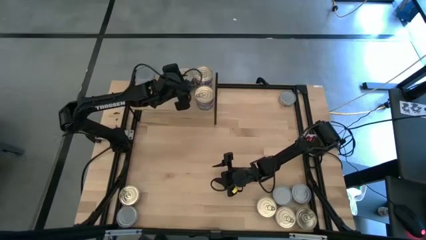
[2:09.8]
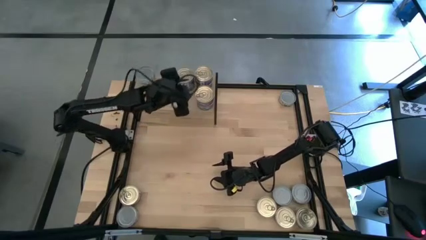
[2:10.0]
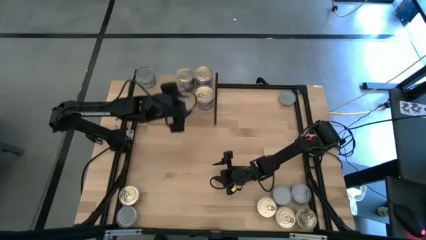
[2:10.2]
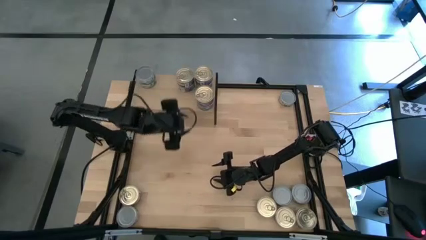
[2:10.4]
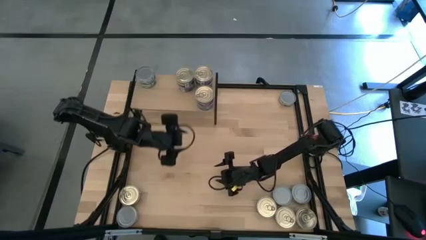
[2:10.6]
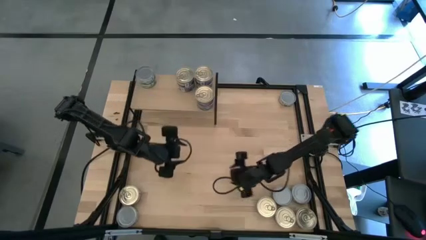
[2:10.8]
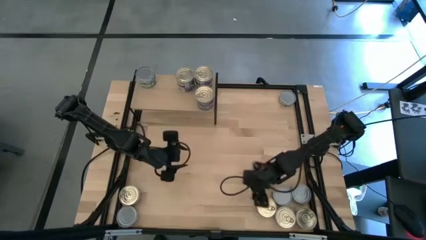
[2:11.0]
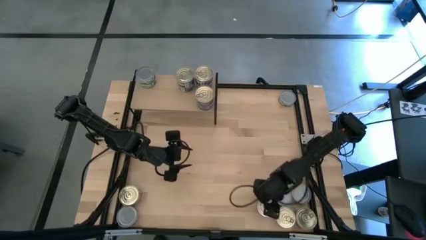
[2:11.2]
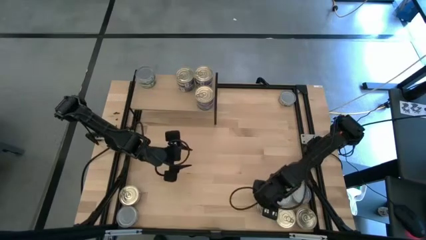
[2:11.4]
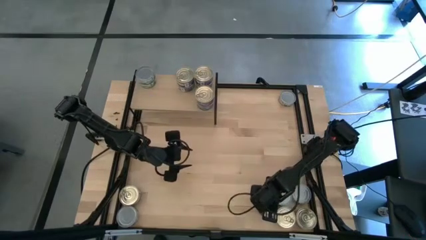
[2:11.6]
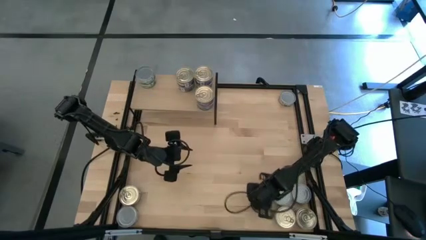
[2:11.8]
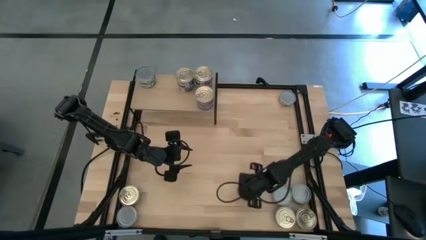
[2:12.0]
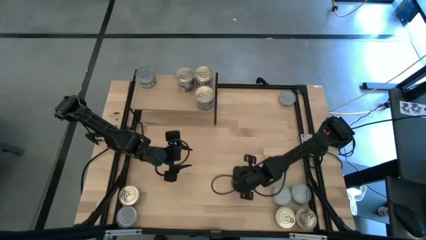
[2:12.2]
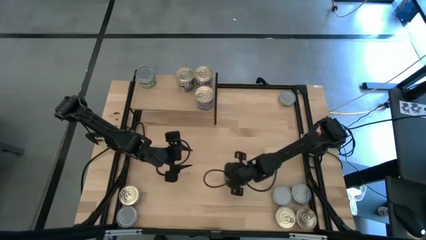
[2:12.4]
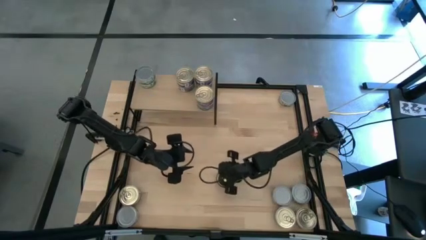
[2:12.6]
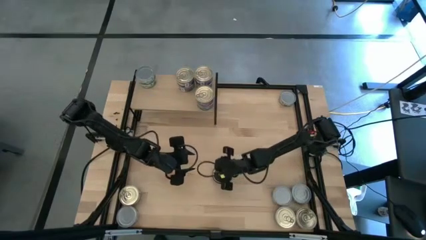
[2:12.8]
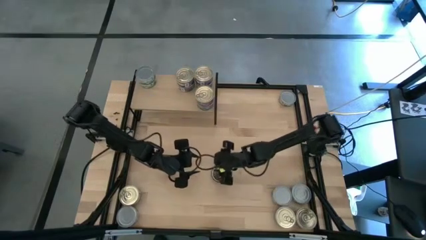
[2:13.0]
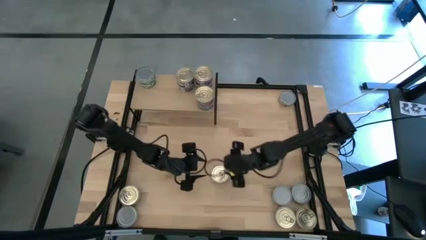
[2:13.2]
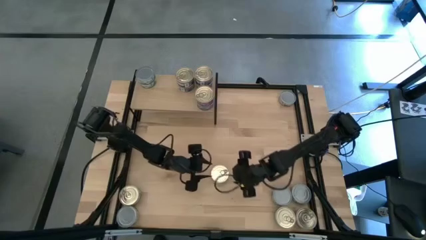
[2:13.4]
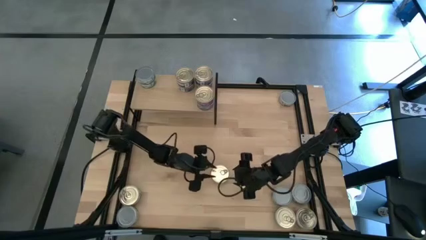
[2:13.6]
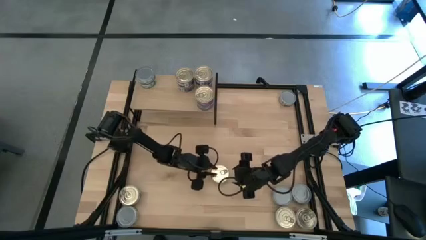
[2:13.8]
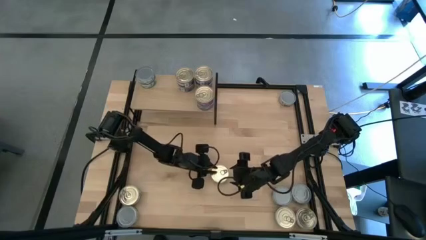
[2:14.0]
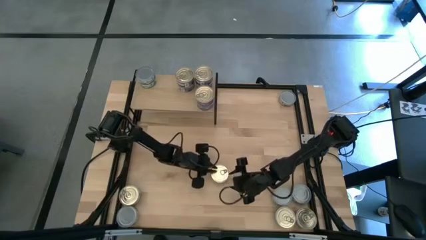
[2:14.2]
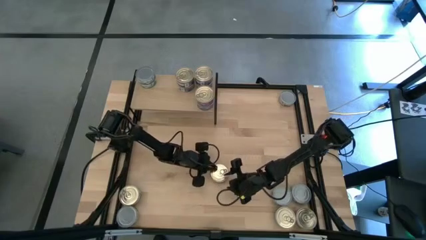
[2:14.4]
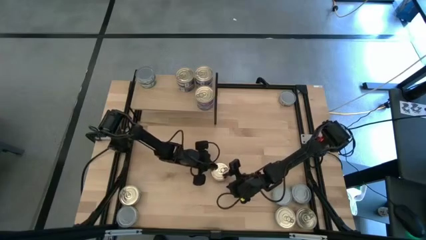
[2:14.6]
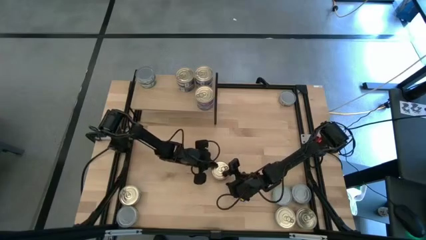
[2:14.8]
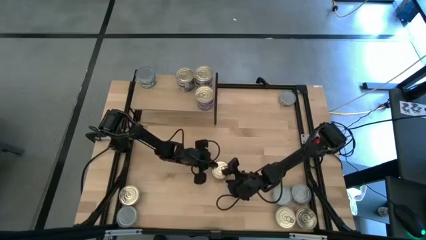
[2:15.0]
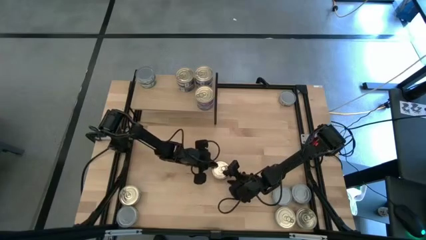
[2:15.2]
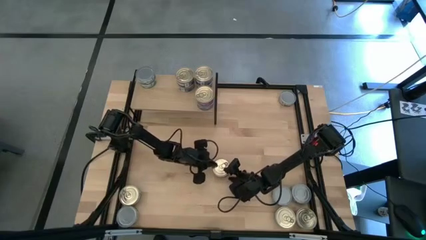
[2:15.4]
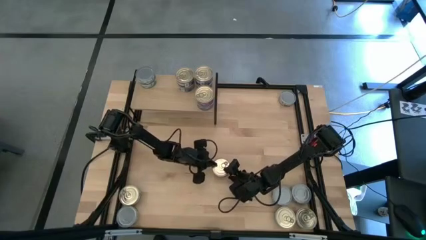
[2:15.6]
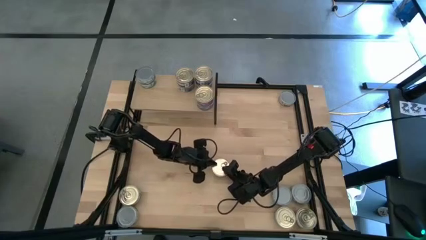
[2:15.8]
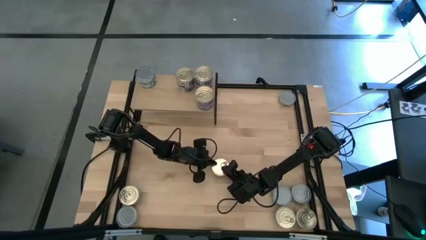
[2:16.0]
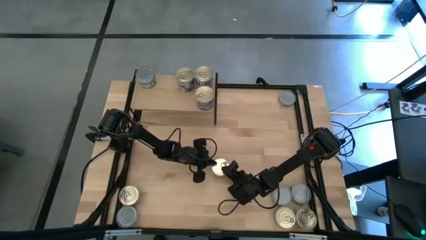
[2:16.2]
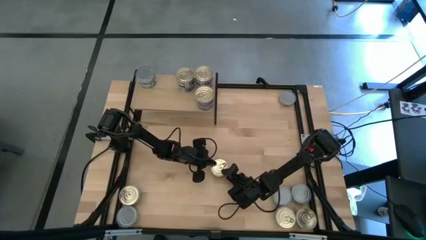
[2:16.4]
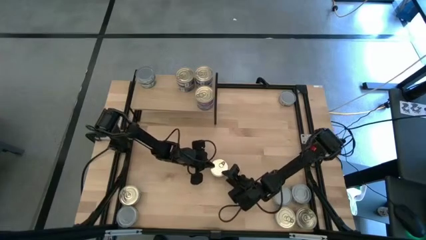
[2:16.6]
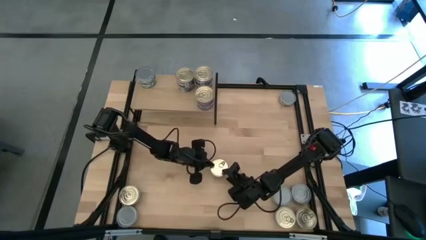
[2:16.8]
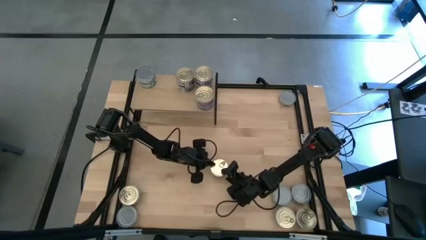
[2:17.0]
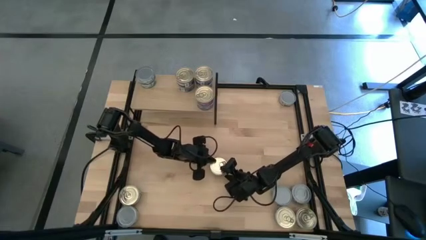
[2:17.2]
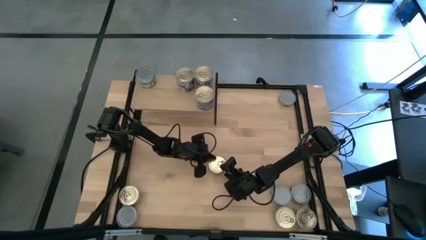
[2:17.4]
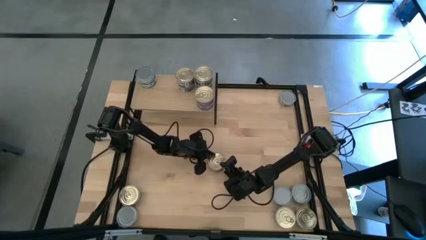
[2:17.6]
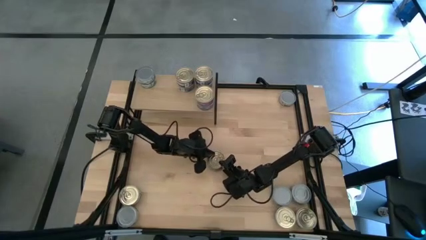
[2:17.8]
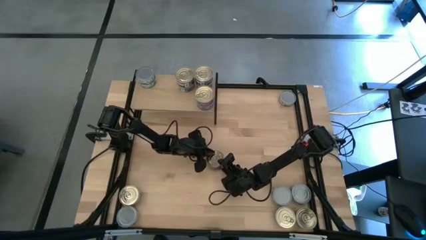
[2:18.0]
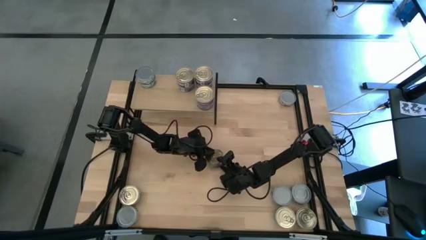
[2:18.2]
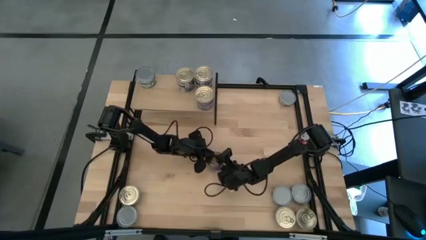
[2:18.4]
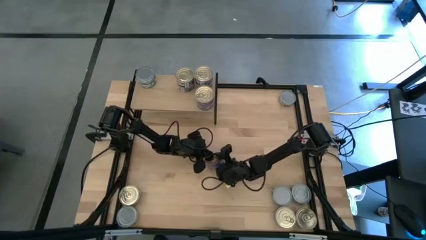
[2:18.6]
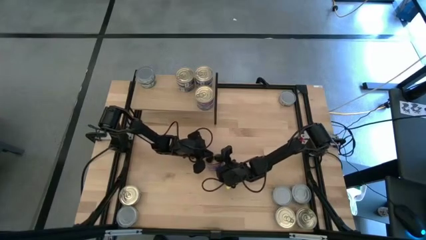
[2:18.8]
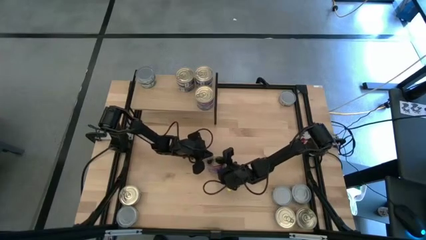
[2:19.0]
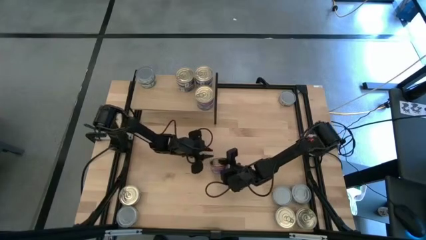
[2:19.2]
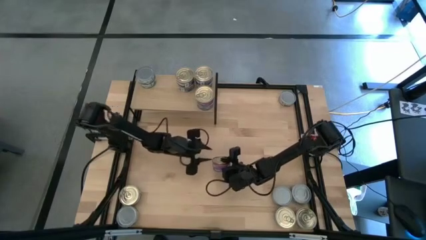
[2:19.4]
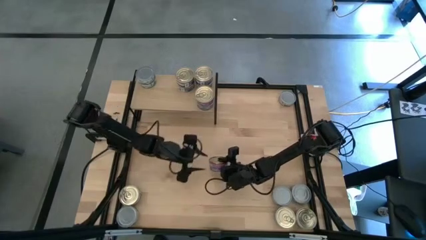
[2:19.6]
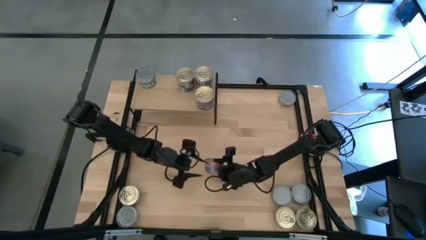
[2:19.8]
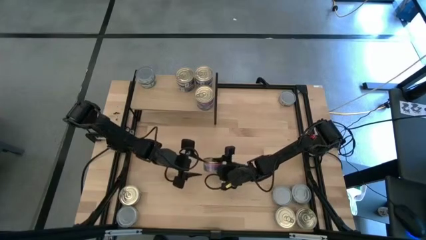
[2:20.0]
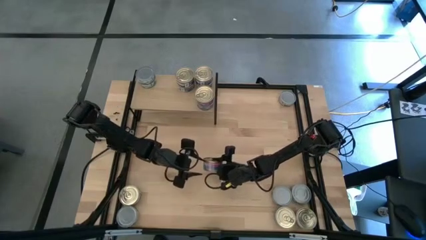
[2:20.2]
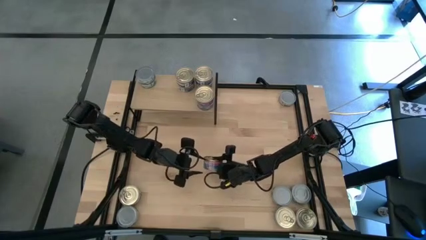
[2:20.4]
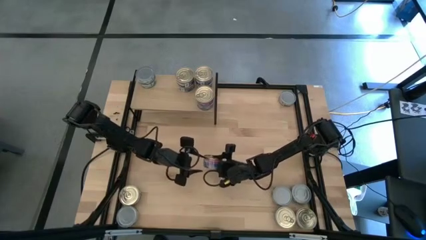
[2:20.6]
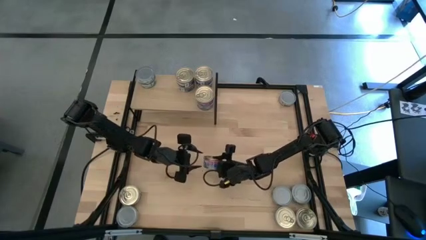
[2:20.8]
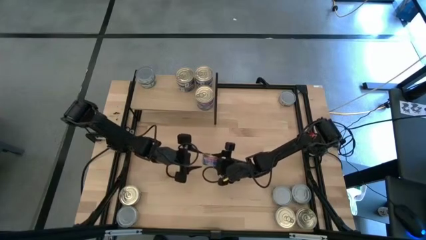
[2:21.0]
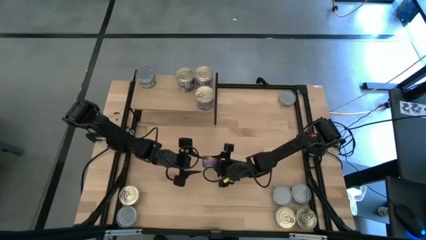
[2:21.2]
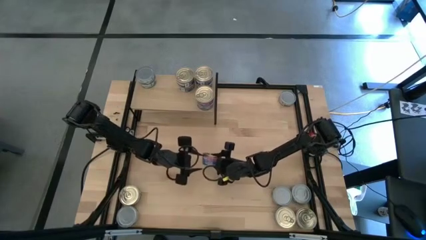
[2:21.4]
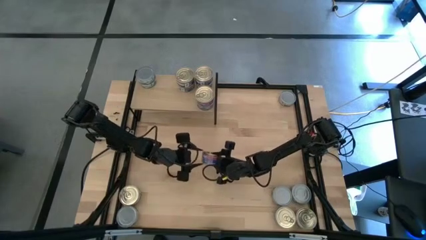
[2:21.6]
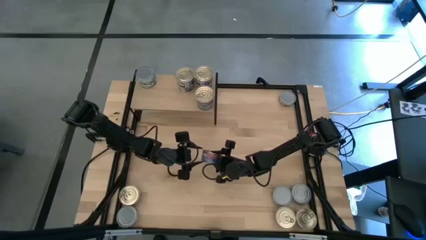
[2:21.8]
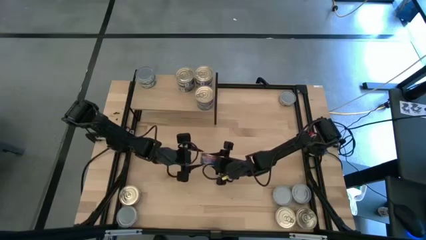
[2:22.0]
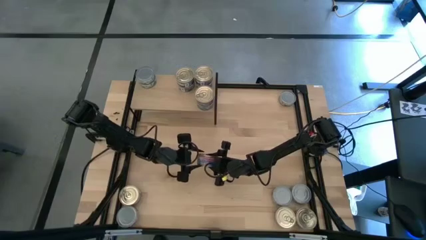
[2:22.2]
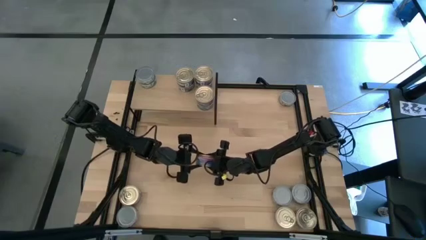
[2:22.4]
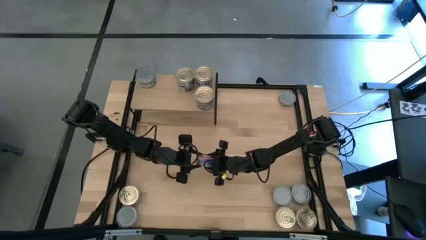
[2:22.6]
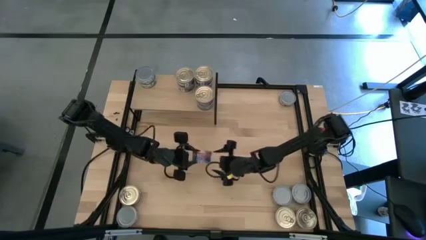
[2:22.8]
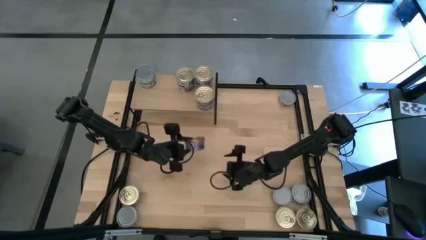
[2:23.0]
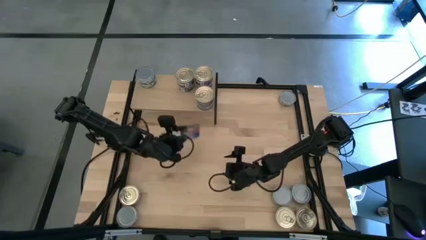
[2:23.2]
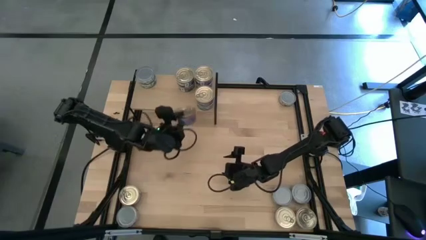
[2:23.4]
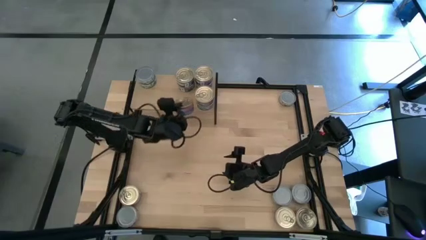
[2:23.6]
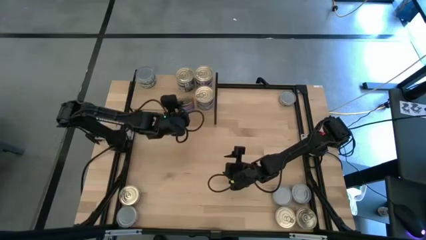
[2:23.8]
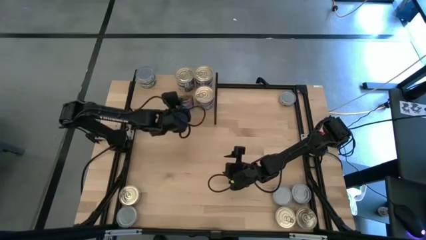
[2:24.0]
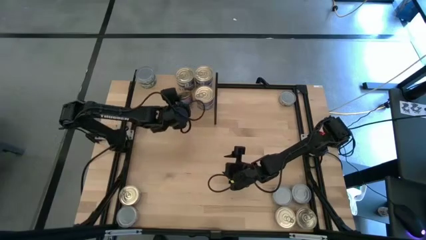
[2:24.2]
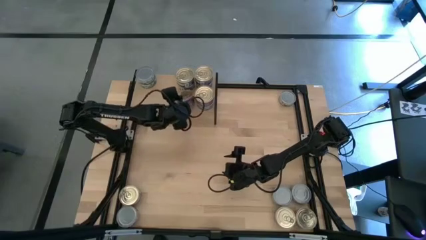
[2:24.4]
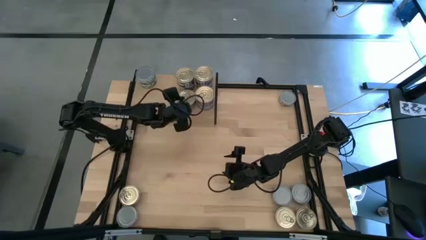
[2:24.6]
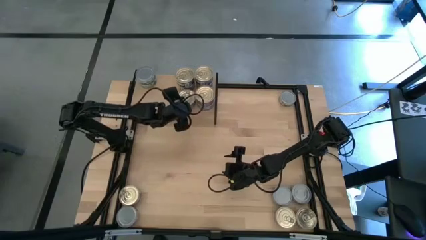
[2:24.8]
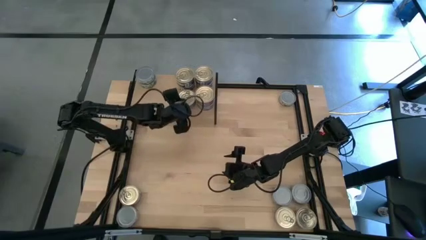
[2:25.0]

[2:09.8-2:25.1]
Task: Stack canned seafood by type on shelf
Put the blue tuna can on the shelf

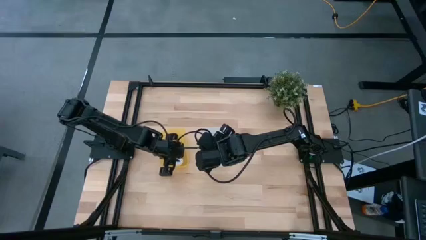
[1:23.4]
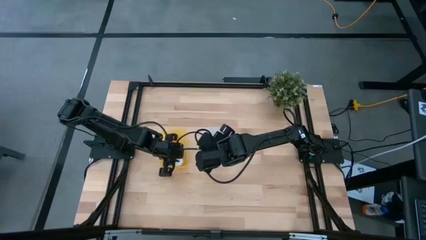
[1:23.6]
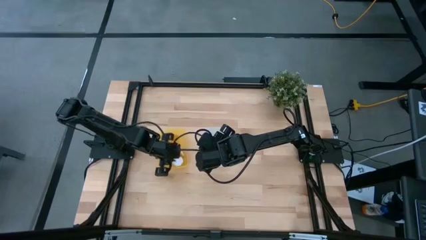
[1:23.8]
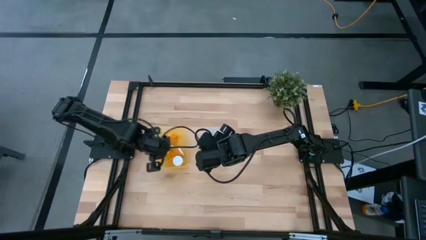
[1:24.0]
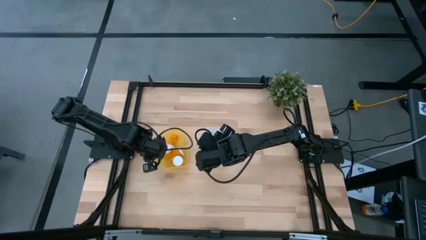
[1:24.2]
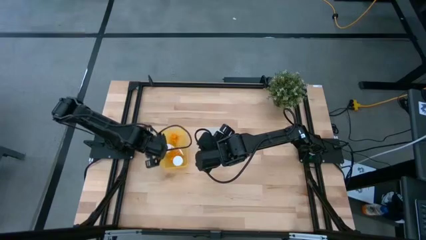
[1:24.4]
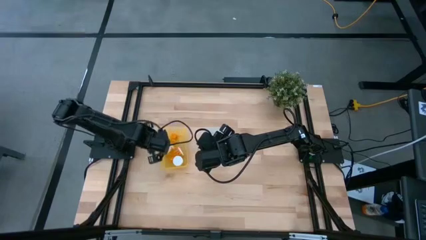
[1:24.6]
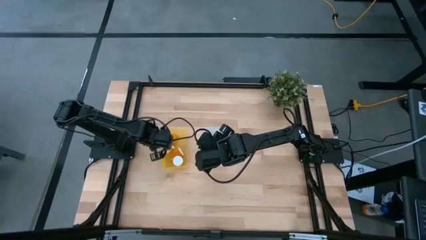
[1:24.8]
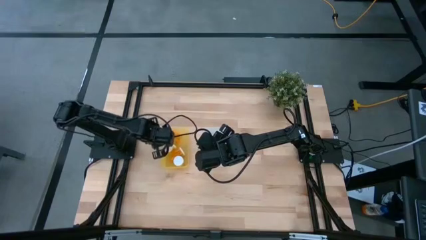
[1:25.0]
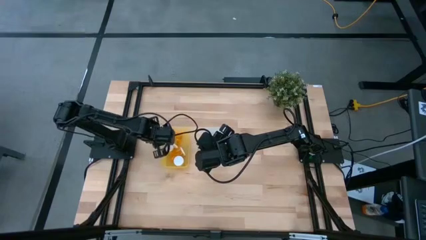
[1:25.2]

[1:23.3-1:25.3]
Task: Pick and place medicine bottles into bin by pill shape (circle, oval)
Adjust the yellow bin
